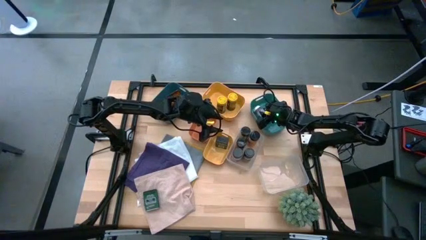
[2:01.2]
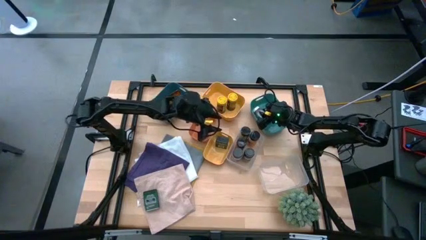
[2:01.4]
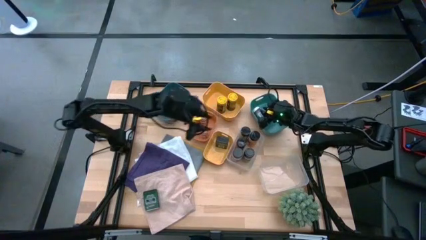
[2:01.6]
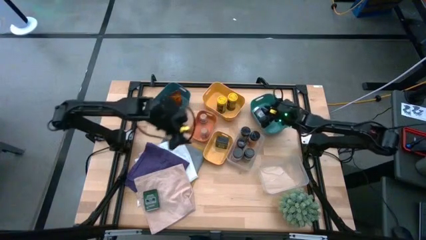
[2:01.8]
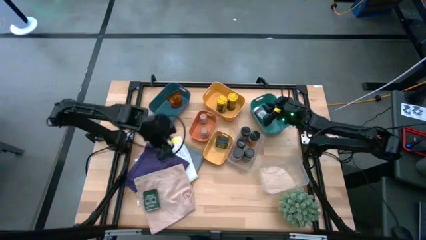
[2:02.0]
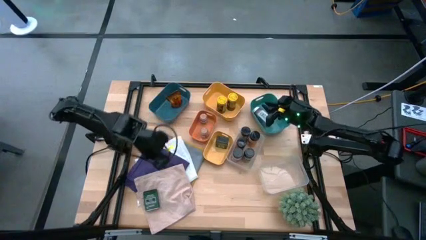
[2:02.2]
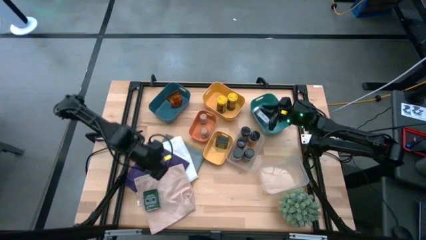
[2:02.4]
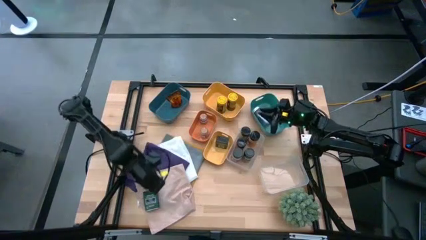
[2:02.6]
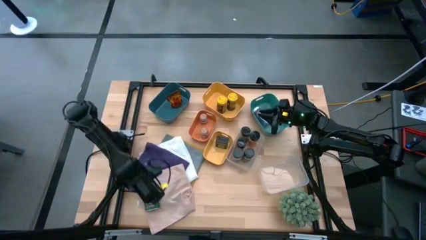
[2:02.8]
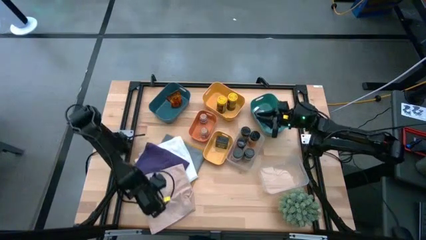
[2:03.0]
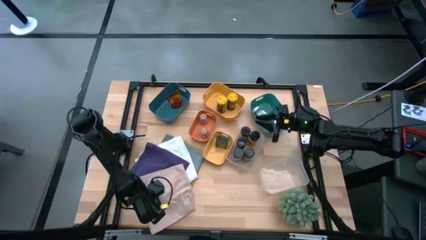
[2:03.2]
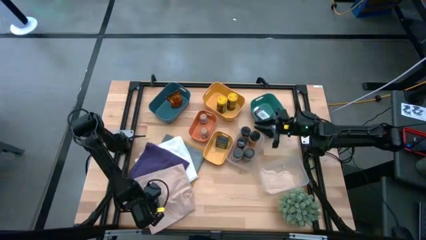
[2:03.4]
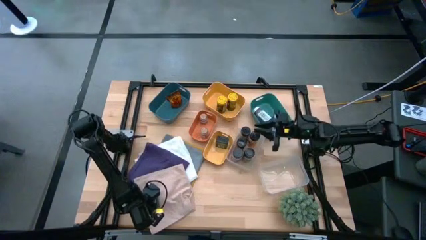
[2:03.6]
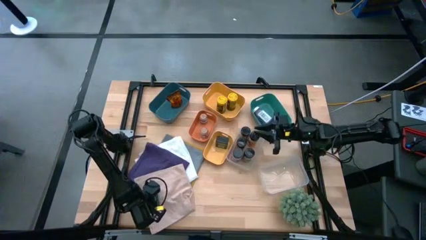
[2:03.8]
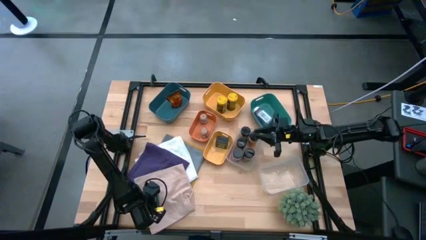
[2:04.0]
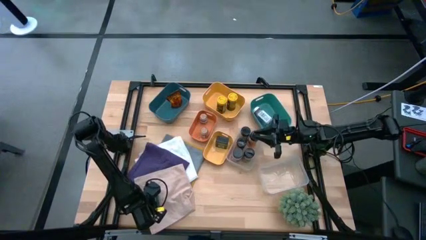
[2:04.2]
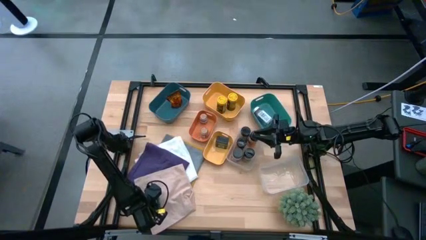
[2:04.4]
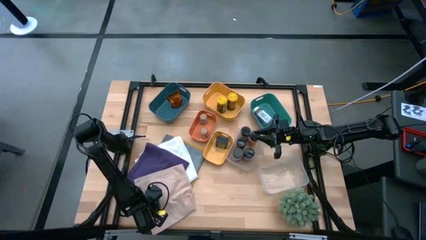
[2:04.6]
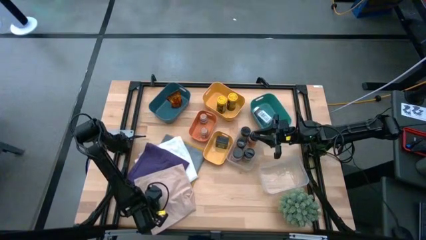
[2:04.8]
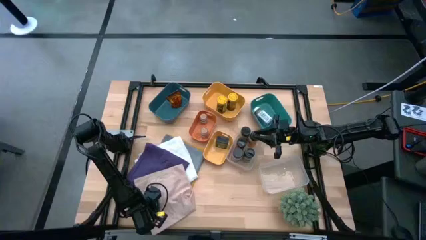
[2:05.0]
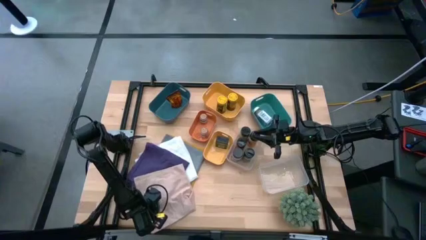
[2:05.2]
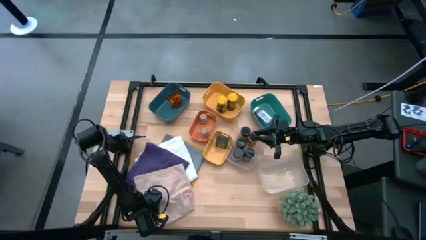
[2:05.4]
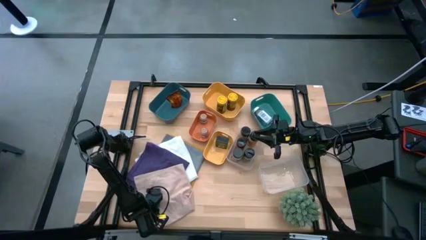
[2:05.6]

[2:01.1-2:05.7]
Task: Sort spices by type
Put the black seasoning can into the small yellow bin

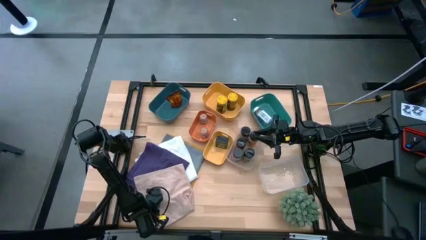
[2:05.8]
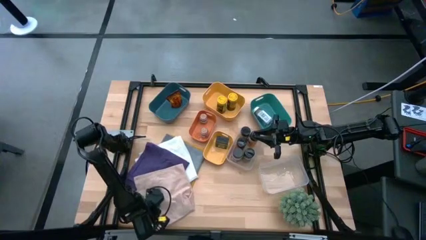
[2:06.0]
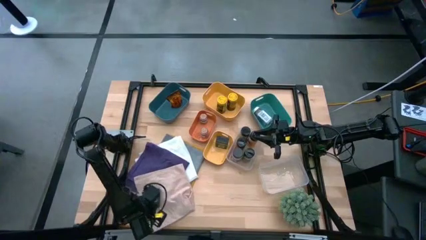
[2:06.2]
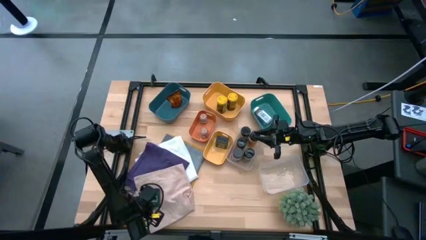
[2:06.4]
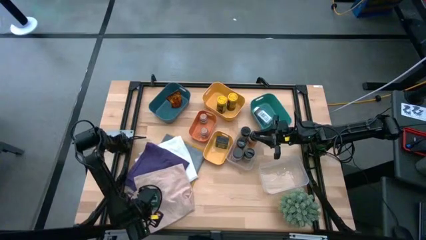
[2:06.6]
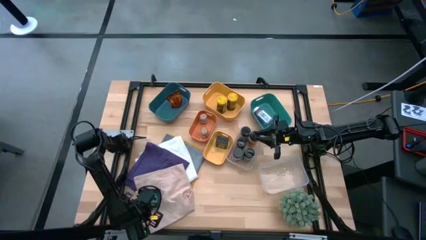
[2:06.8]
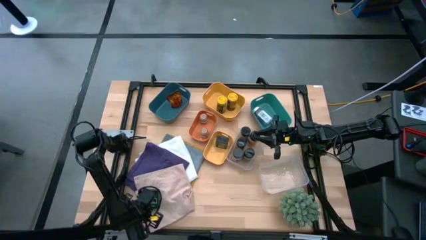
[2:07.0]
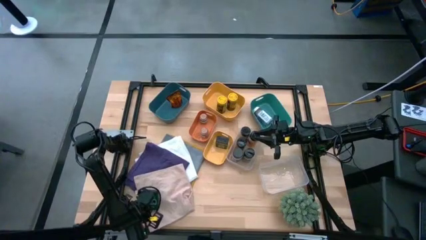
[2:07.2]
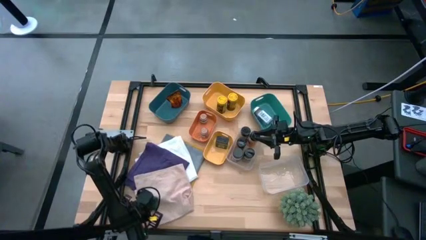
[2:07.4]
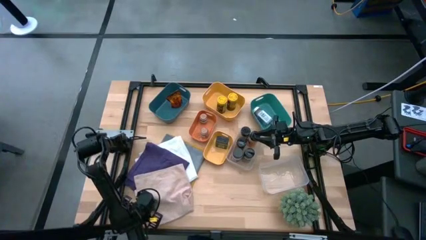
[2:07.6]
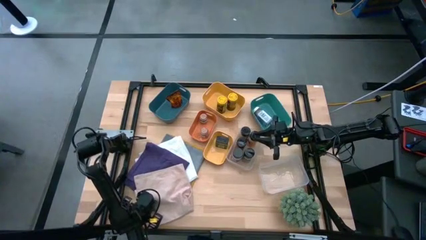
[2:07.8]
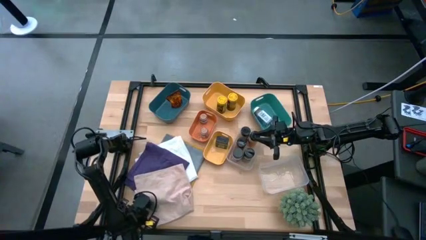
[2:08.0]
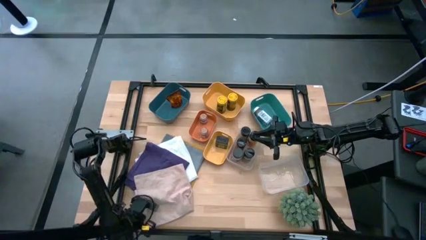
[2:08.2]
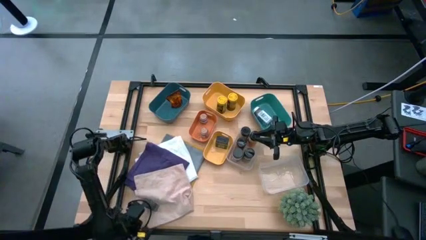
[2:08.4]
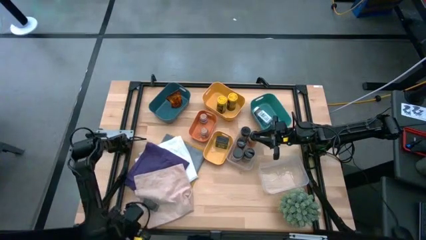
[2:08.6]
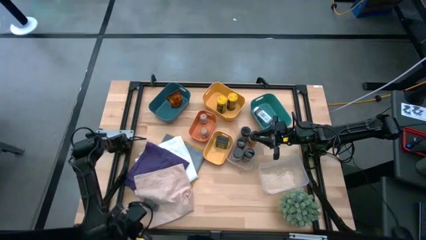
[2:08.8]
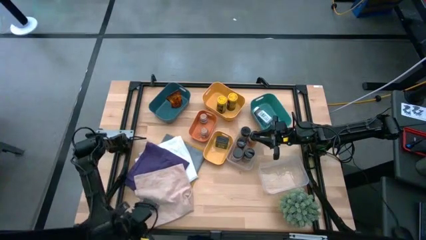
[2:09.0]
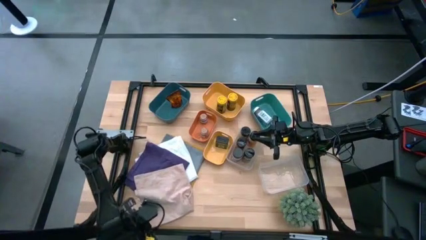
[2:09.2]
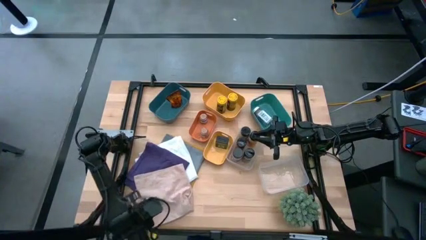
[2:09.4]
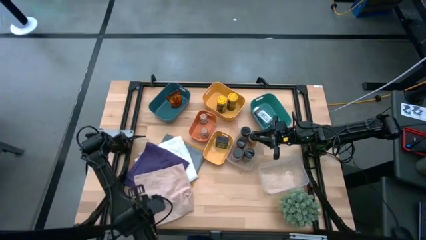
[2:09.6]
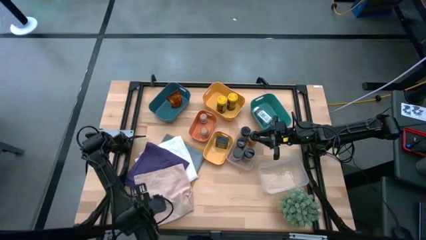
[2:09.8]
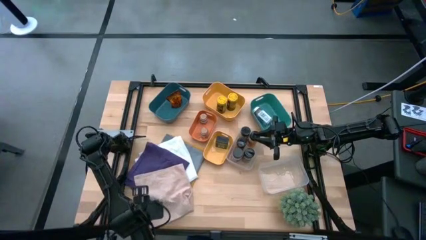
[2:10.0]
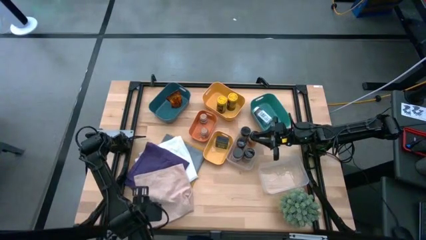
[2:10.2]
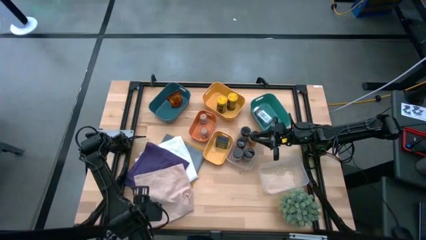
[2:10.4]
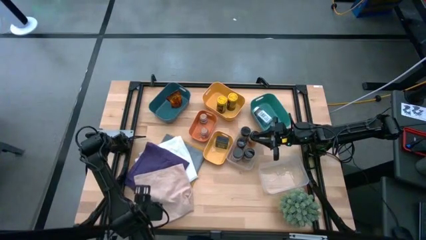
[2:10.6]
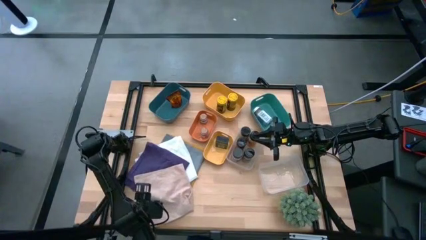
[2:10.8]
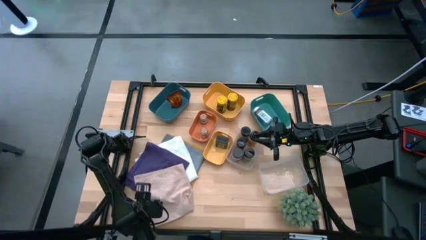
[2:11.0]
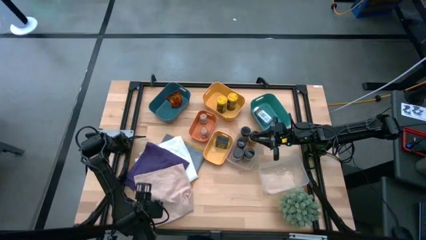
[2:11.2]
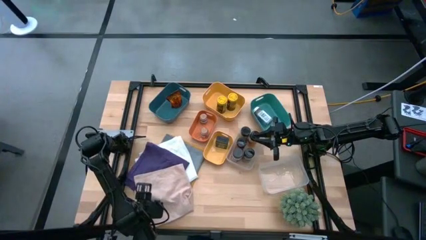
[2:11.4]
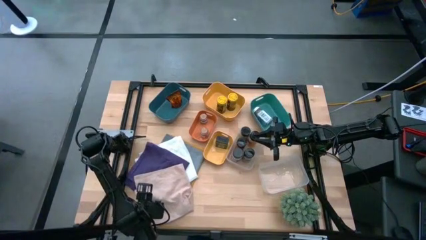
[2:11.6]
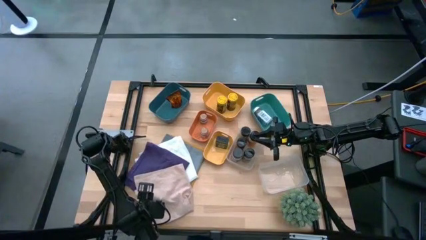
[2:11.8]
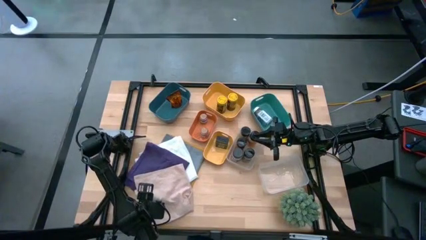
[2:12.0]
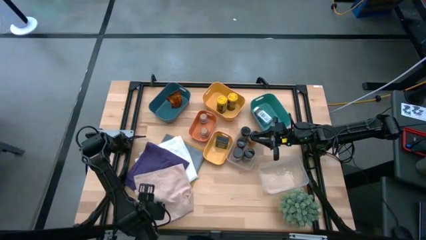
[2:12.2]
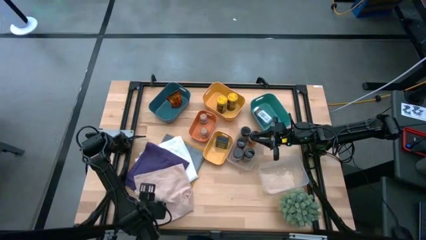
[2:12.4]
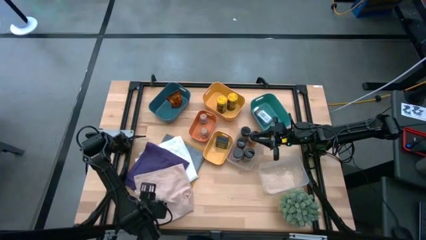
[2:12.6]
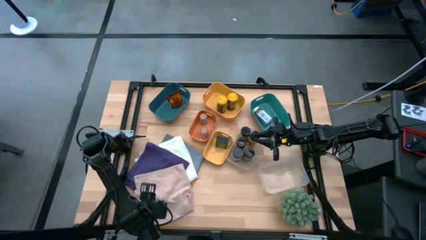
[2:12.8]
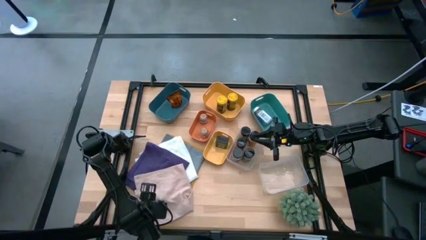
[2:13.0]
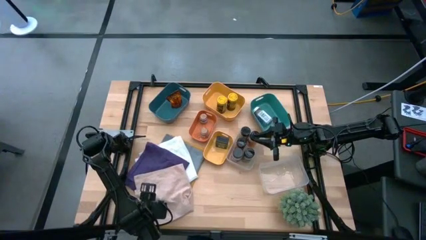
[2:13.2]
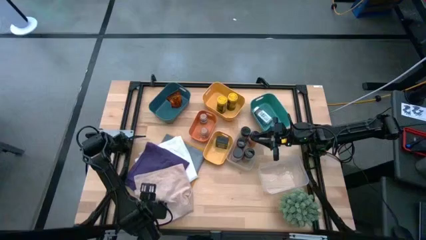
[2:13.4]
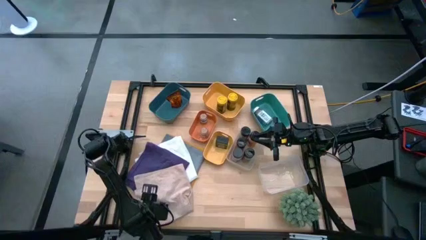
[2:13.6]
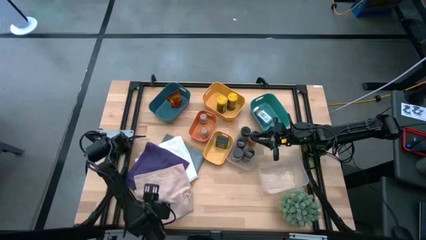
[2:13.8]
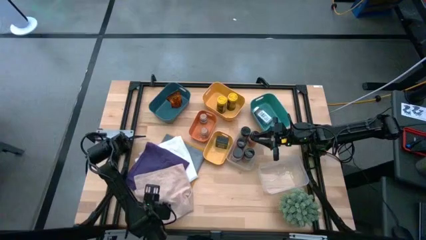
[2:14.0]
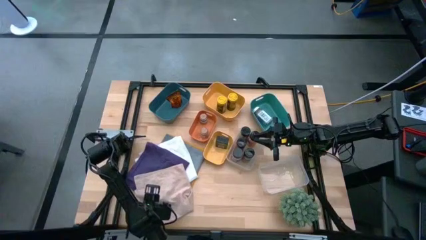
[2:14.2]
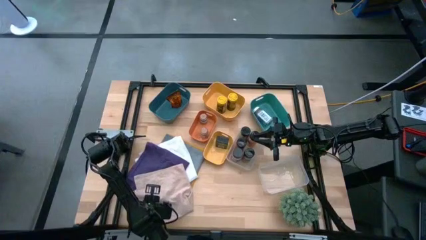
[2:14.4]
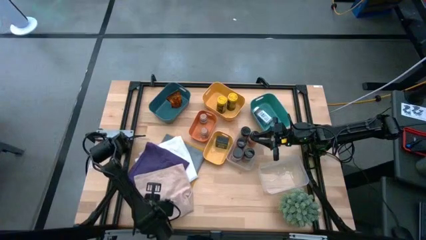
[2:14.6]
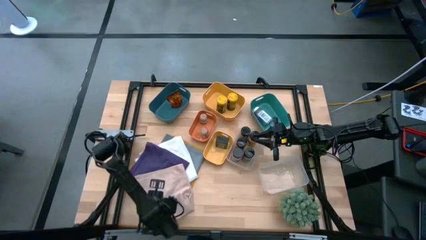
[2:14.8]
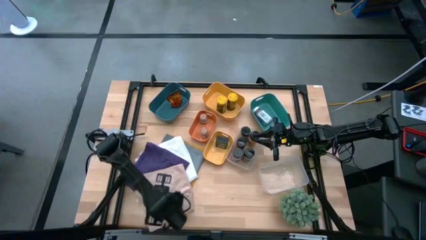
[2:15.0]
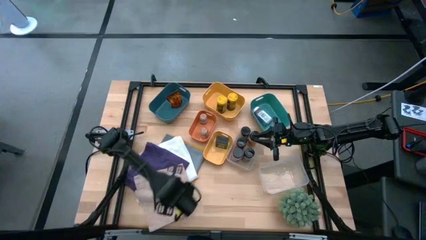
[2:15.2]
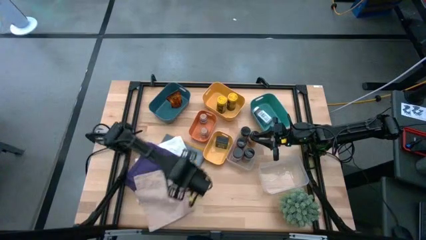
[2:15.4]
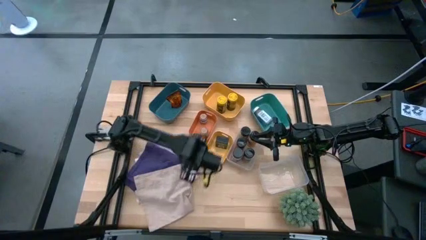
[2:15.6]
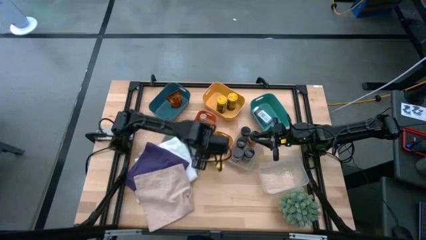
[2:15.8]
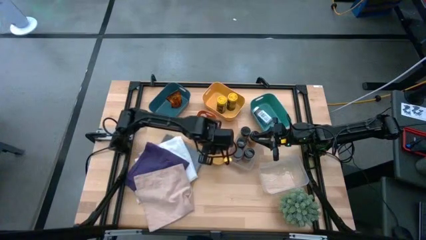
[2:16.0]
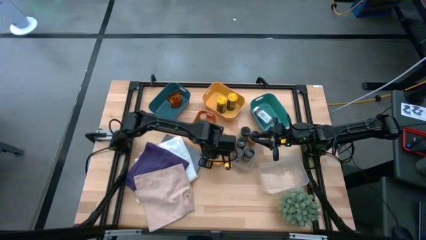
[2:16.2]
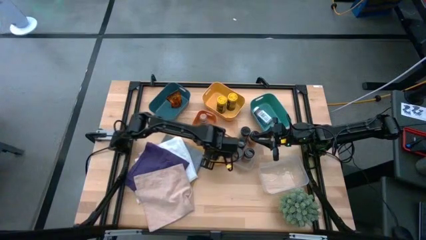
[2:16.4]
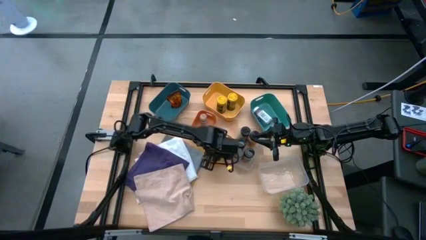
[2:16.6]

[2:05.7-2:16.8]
Put the black seasoning can into the small yellow bin

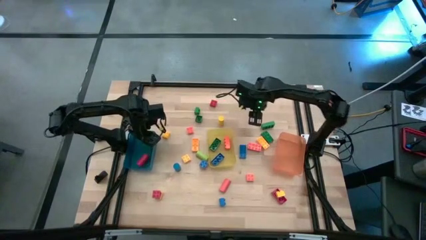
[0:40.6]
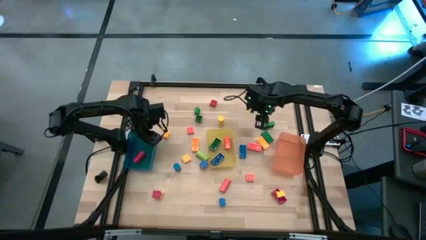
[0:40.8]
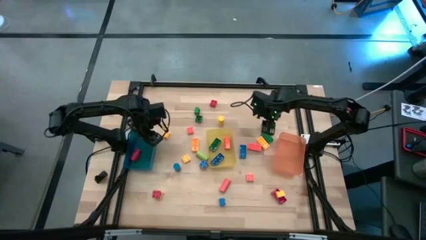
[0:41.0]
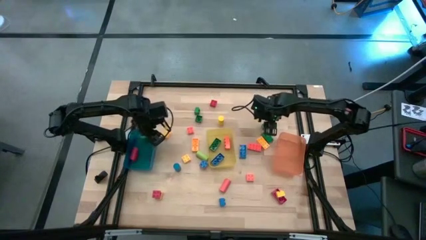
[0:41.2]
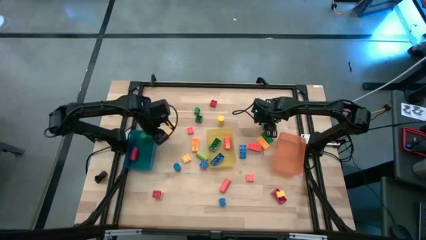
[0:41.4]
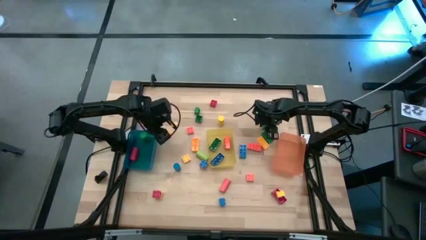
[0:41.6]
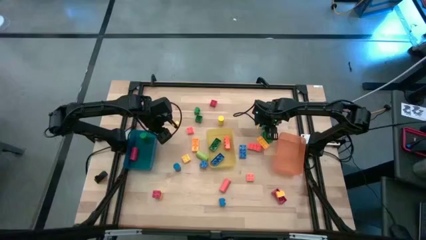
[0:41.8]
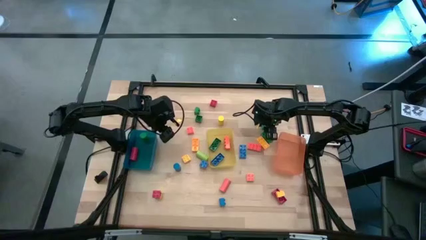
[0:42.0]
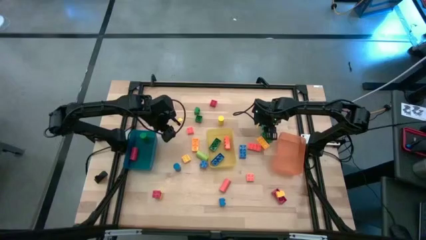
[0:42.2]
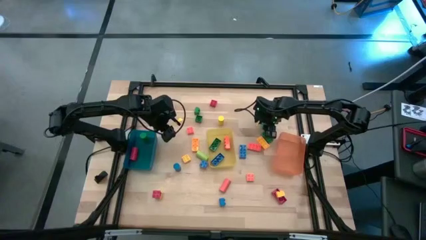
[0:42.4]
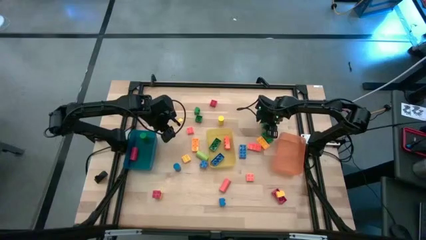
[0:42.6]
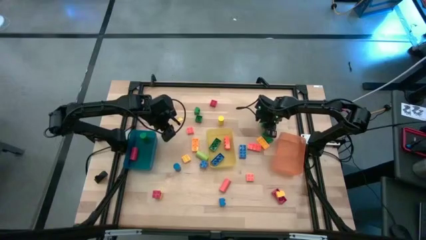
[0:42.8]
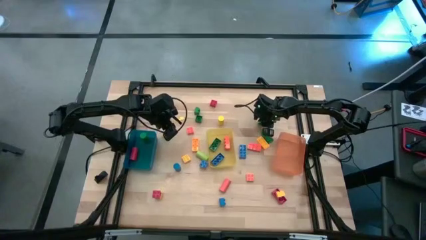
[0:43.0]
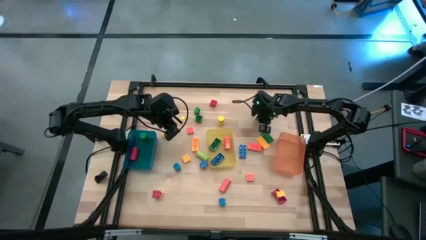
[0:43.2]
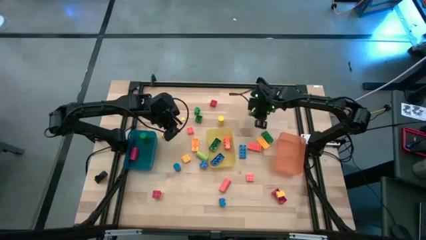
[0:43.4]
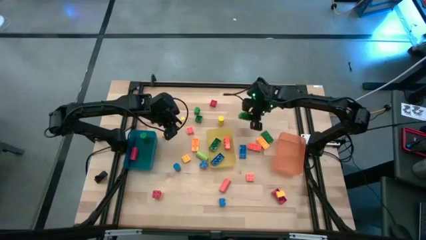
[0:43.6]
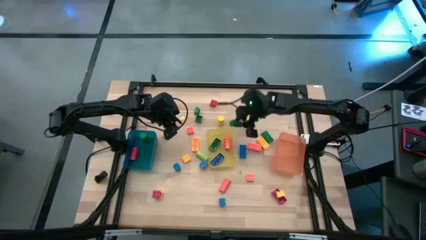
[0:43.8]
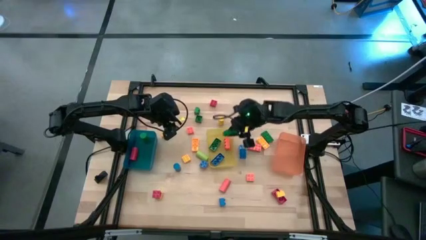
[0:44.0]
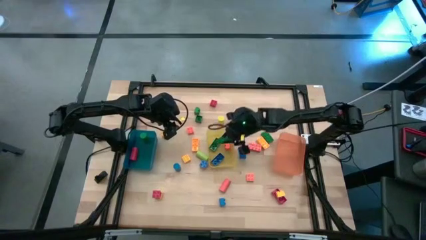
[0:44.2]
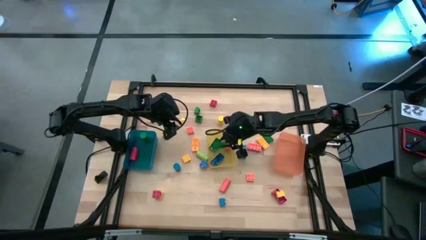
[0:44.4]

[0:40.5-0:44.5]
Task: Sort blocks by size
Put the green 8 stud game piece into the yellow bin
